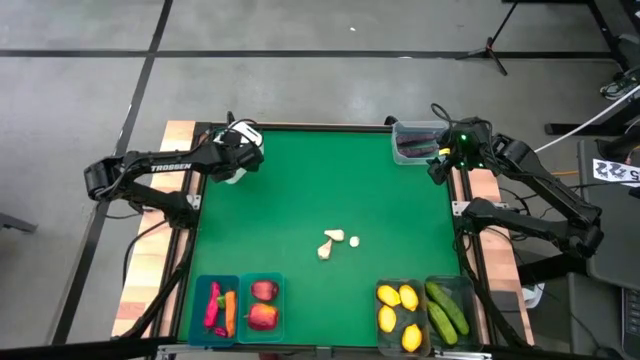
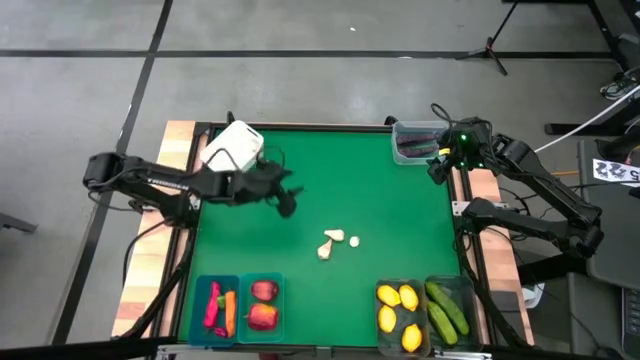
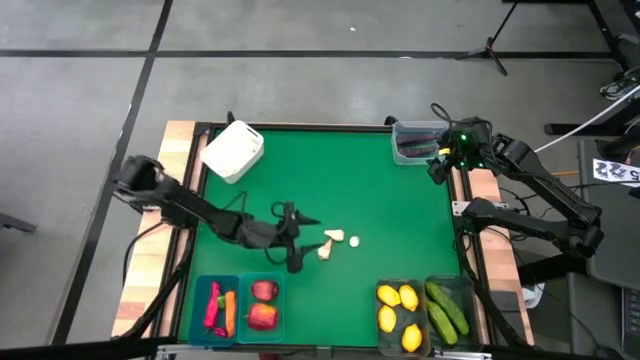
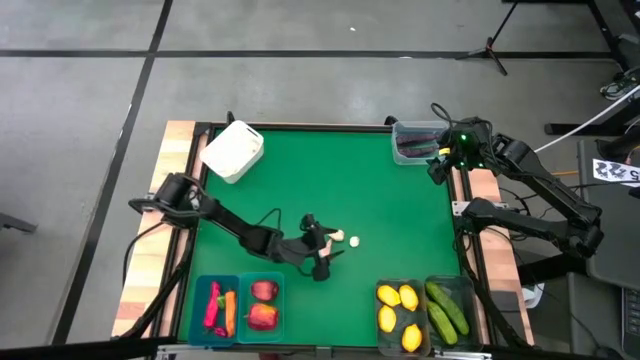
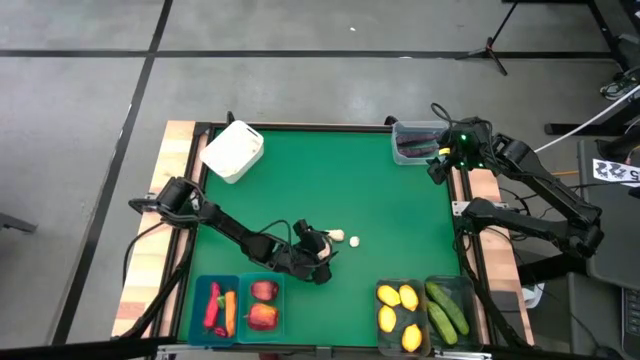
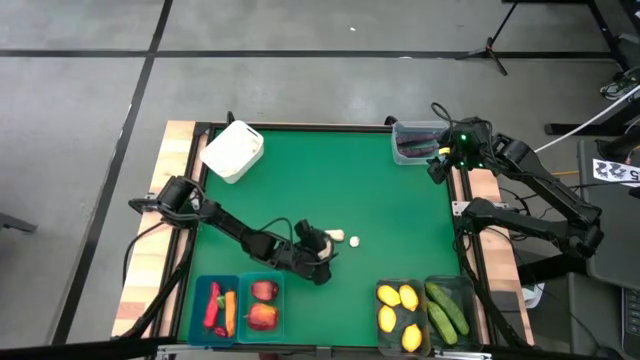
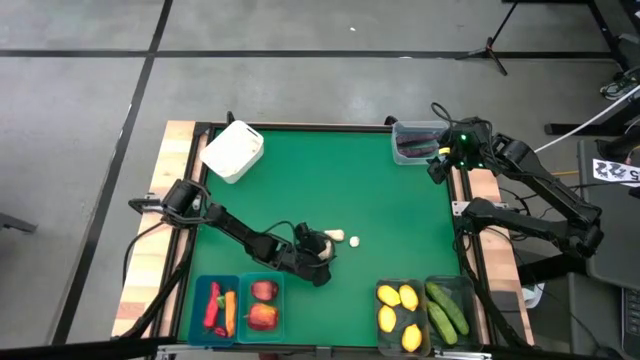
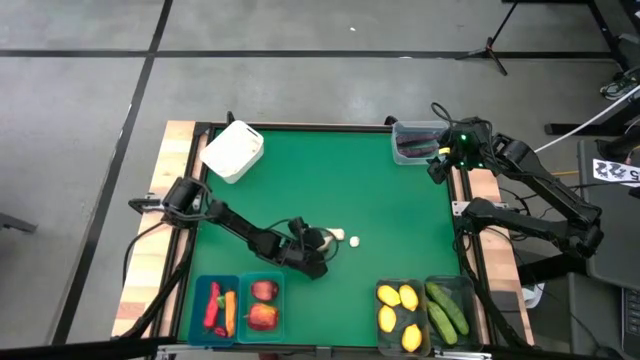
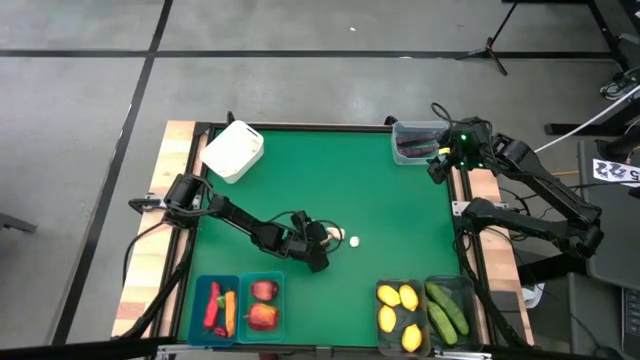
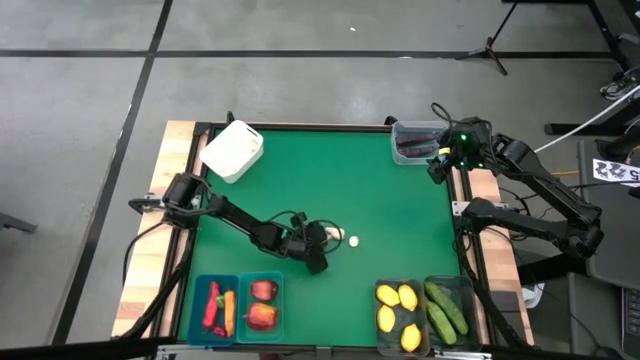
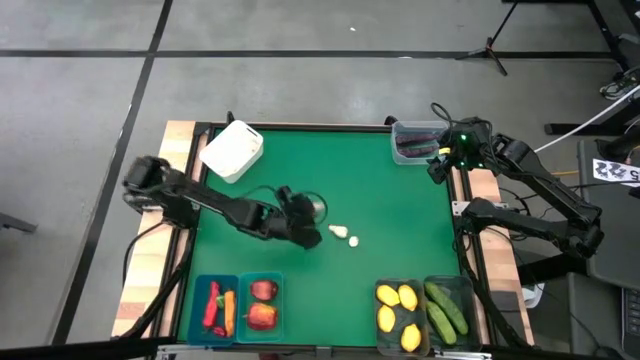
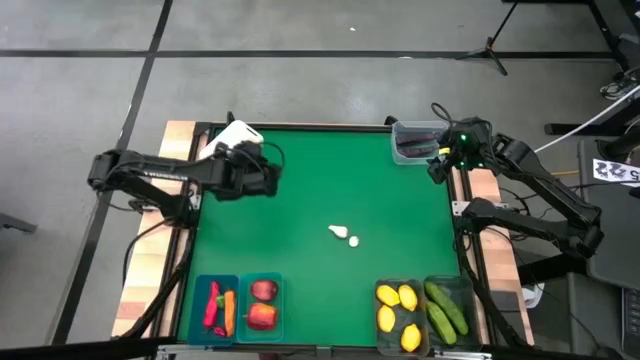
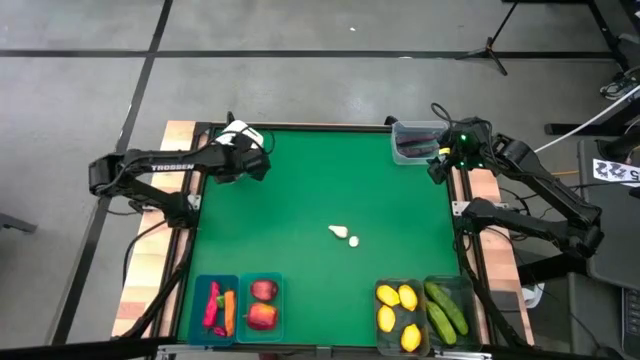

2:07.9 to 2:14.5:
Task: Sort produce into baskets
Put the garlic into the white bin

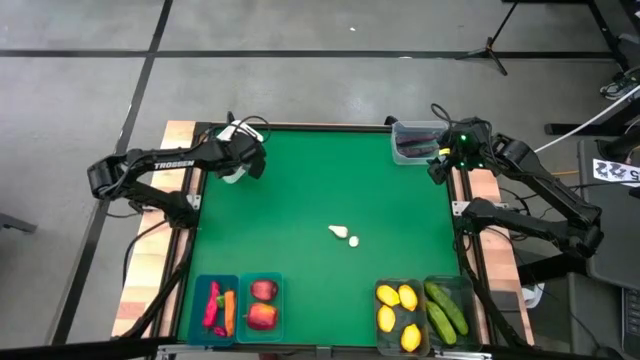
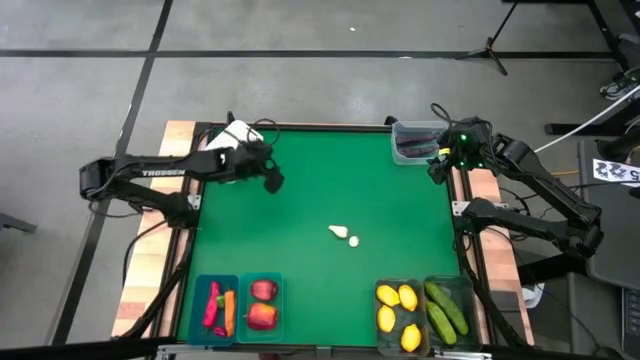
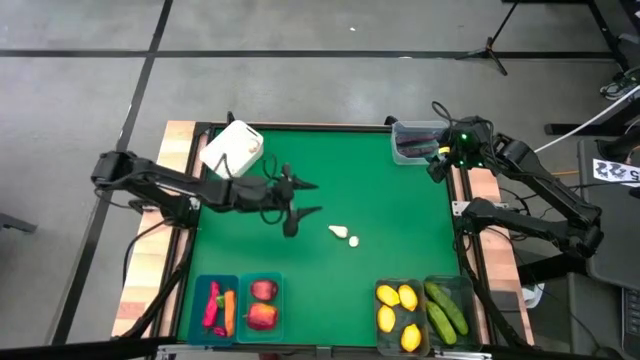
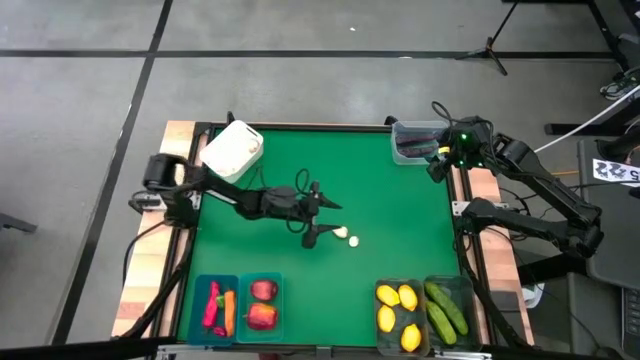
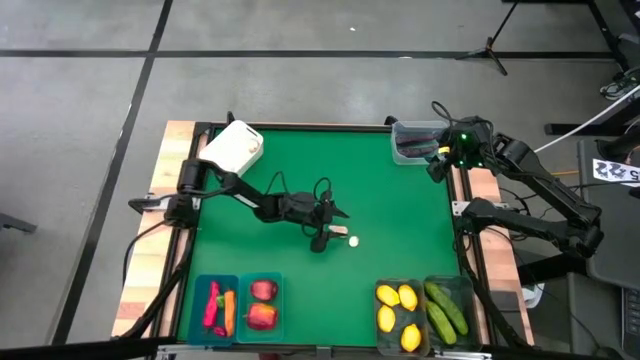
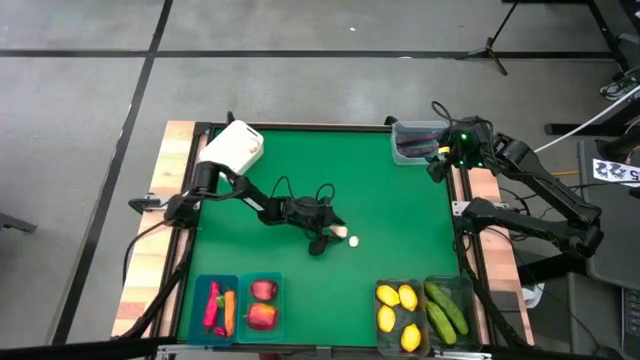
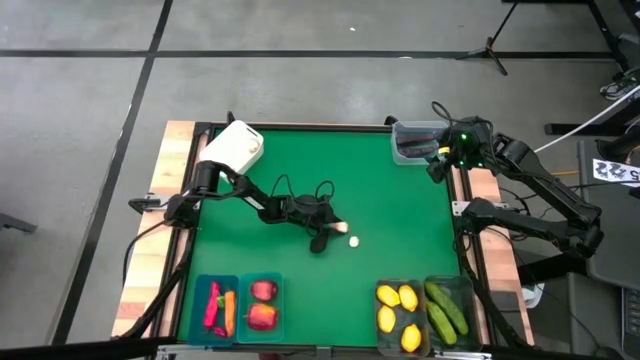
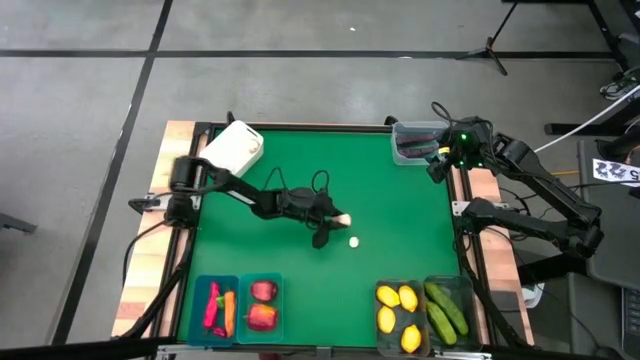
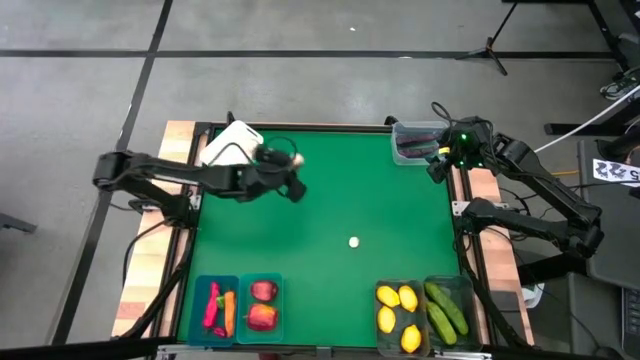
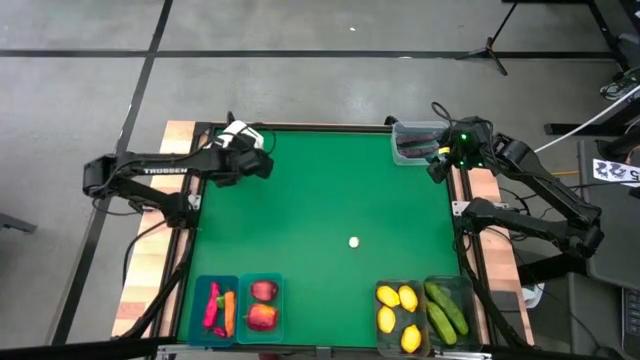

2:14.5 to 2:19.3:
Put the garlic into the white bin

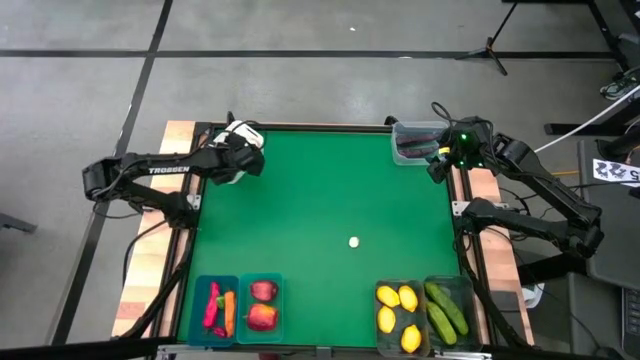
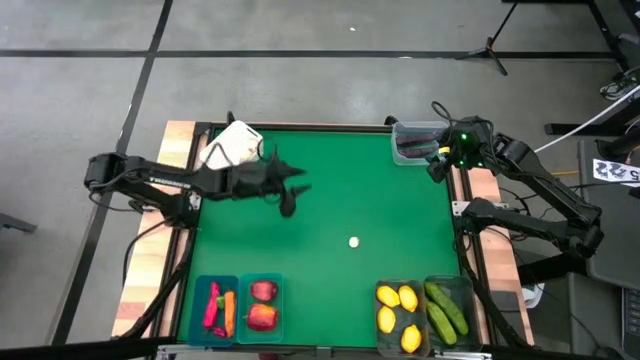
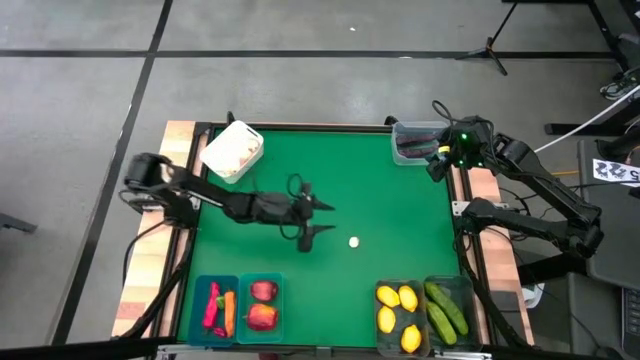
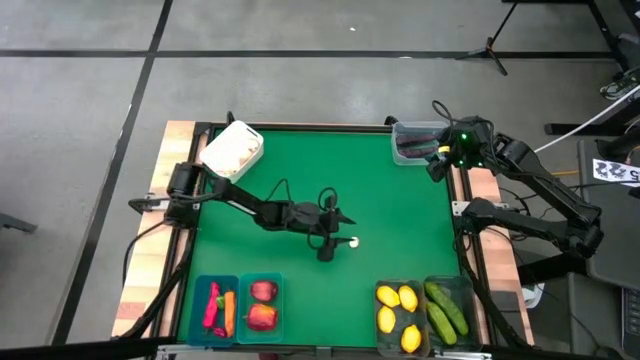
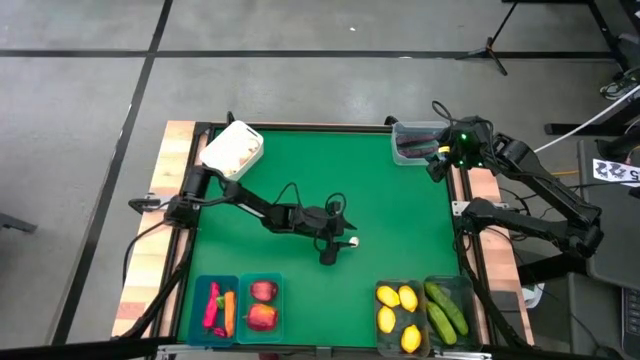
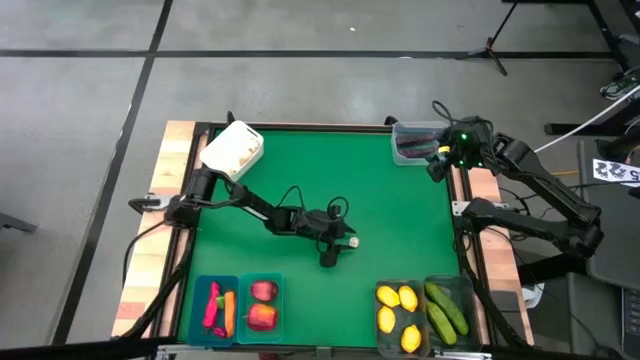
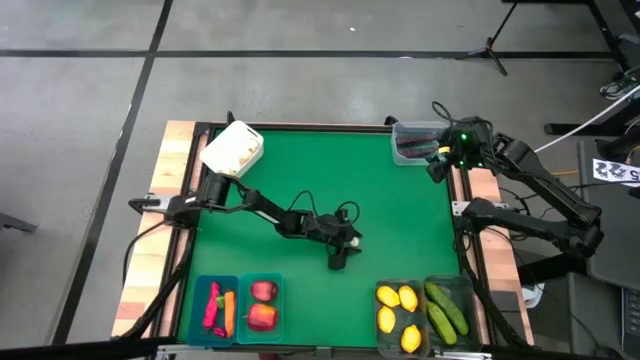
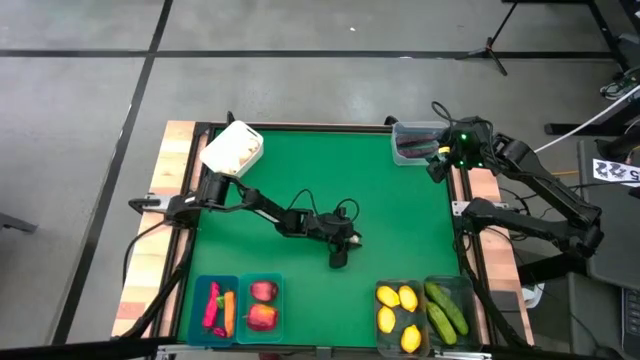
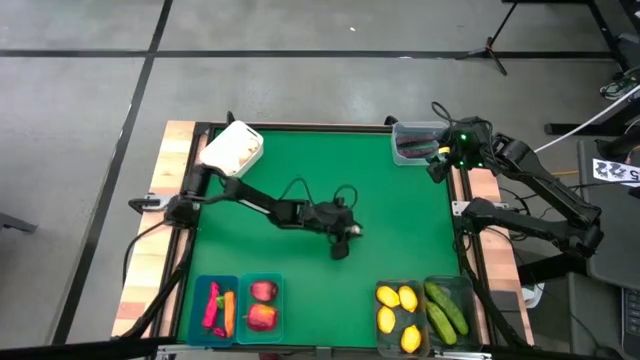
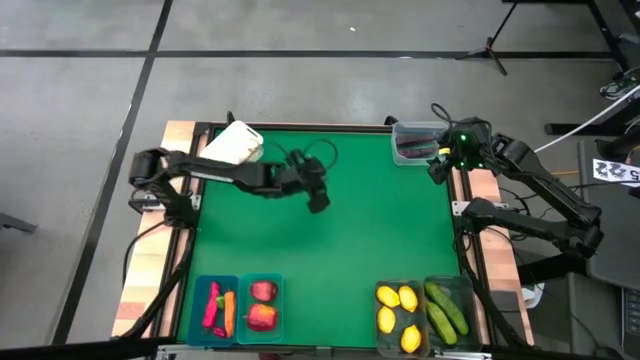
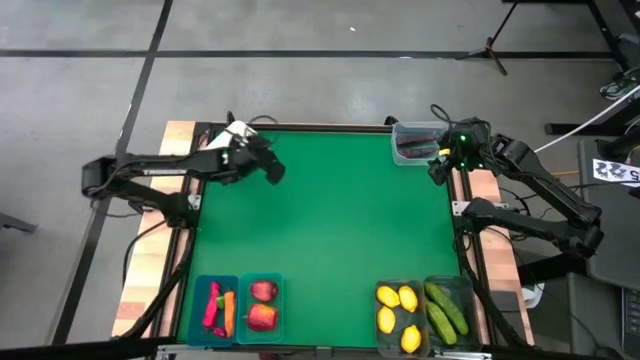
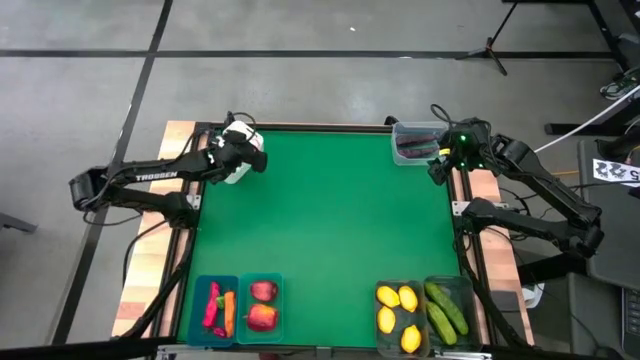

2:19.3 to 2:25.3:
Put the garlic into the white bin

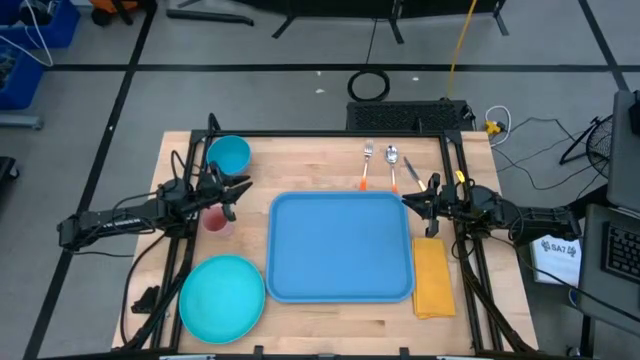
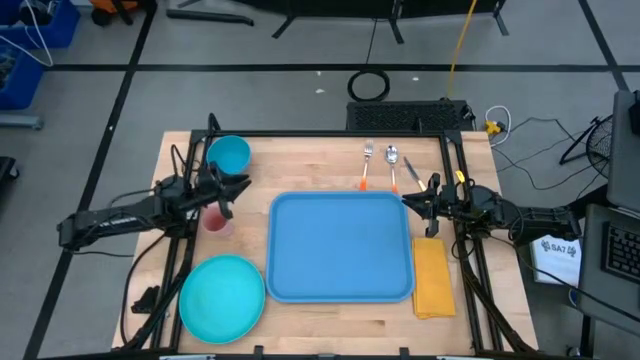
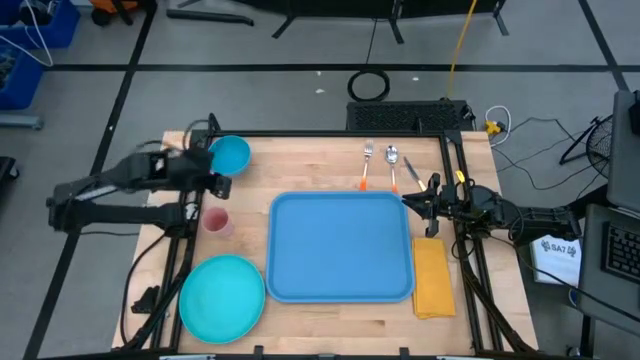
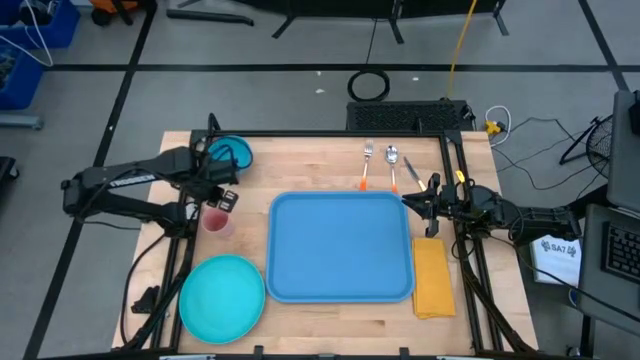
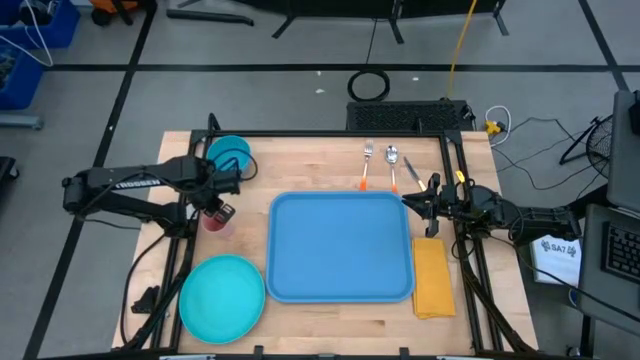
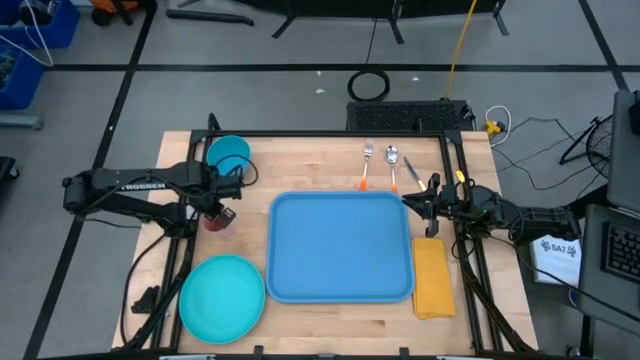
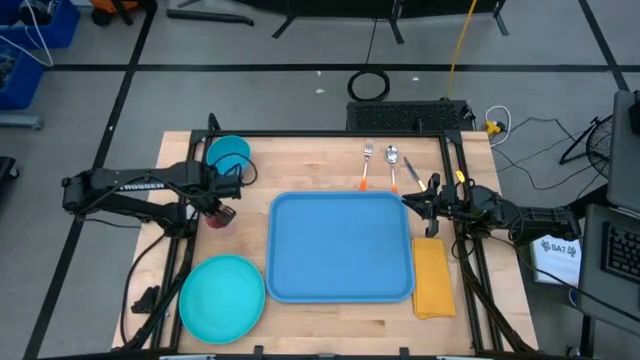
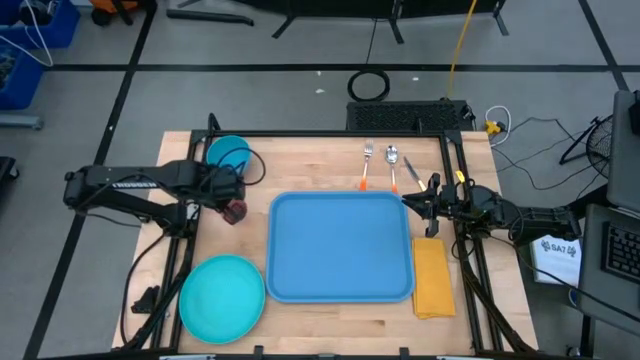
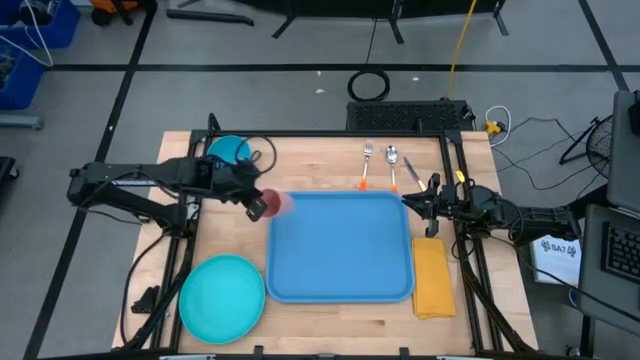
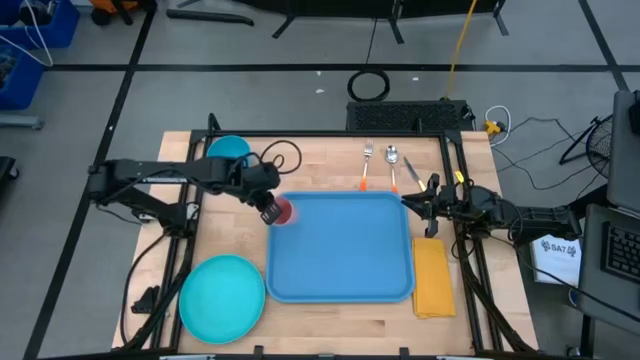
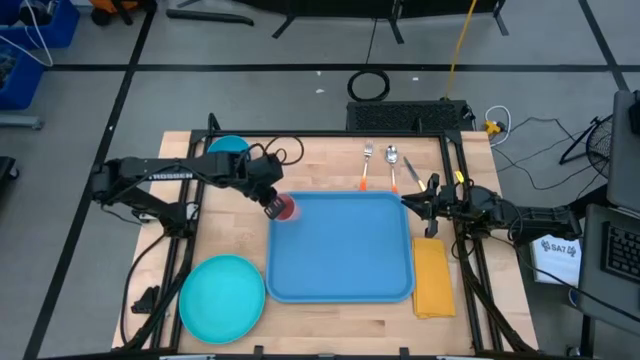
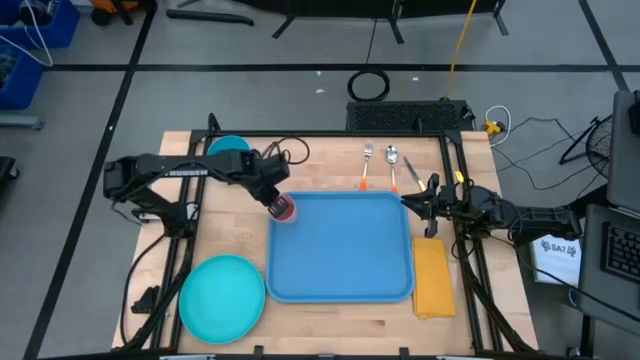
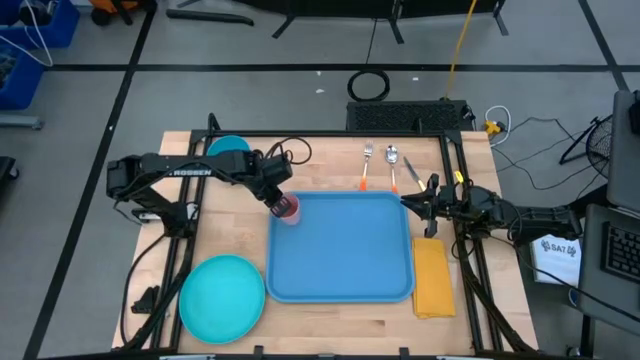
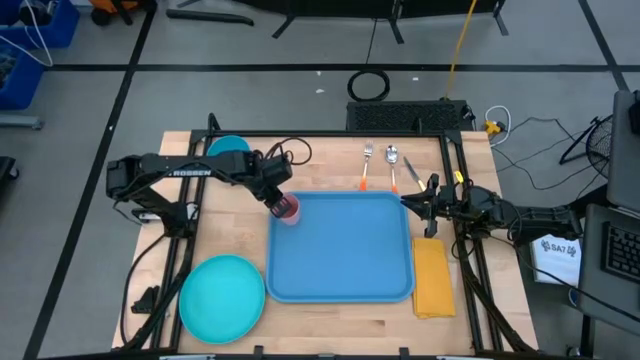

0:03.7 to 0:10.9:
Task: Set up tray
Put the pink cup on the blue serving tray
